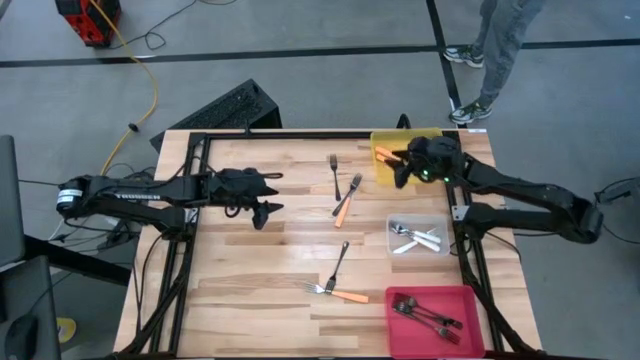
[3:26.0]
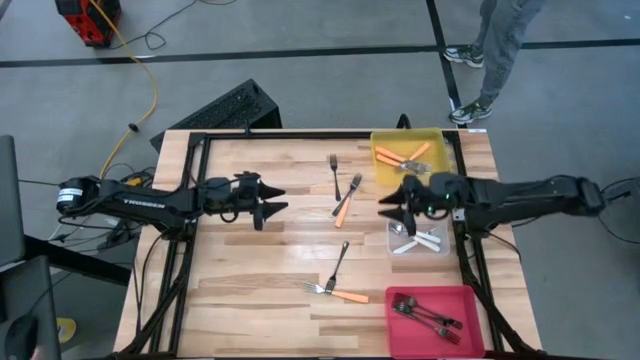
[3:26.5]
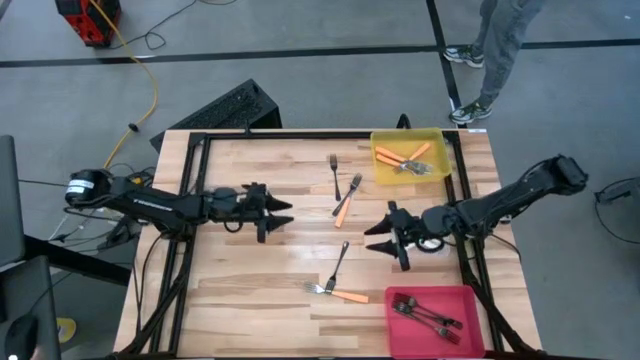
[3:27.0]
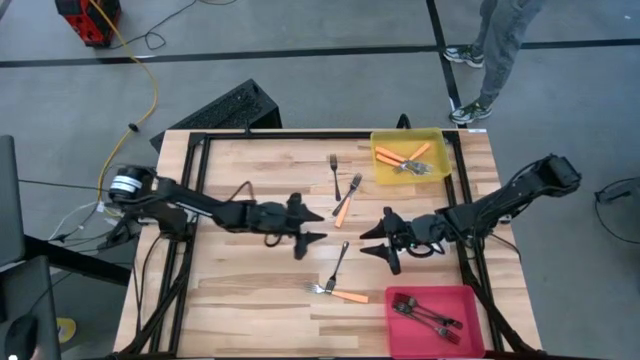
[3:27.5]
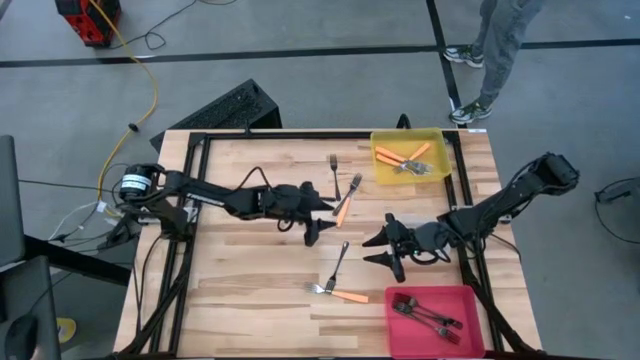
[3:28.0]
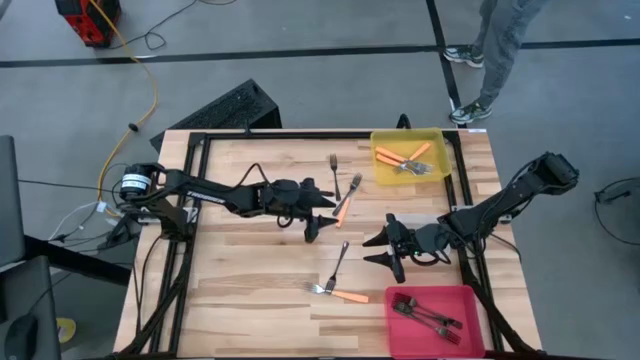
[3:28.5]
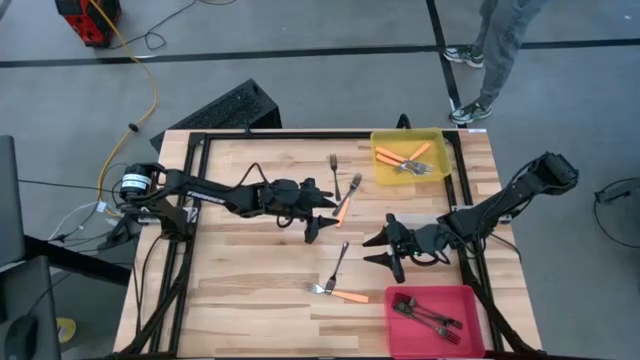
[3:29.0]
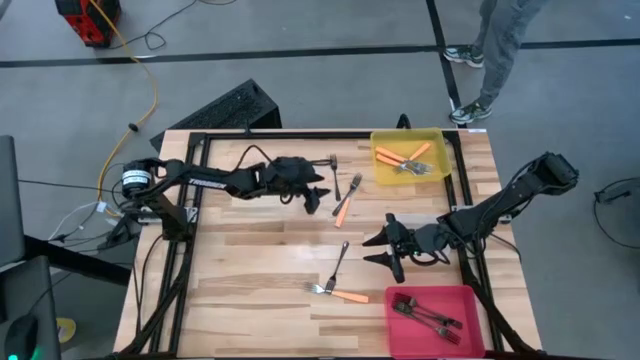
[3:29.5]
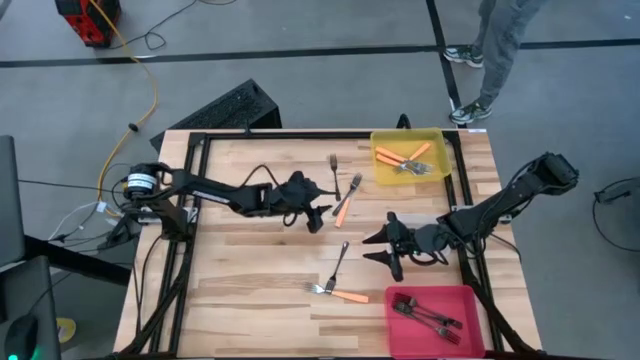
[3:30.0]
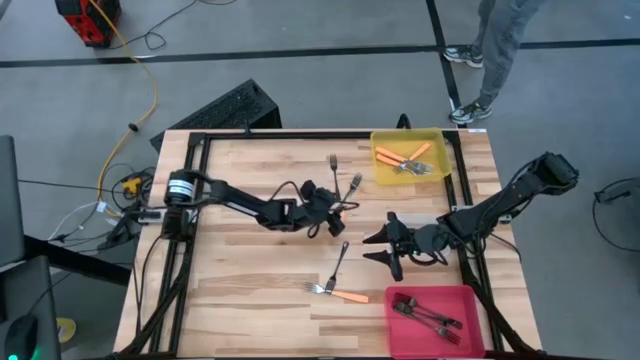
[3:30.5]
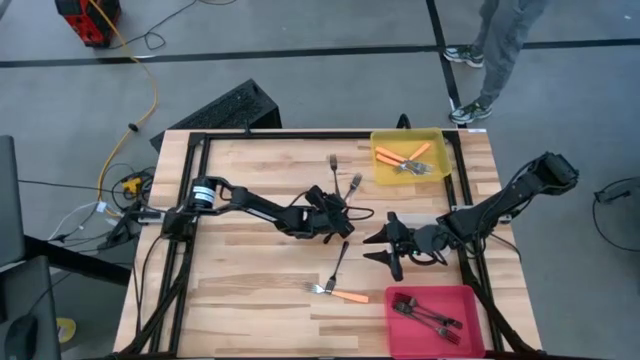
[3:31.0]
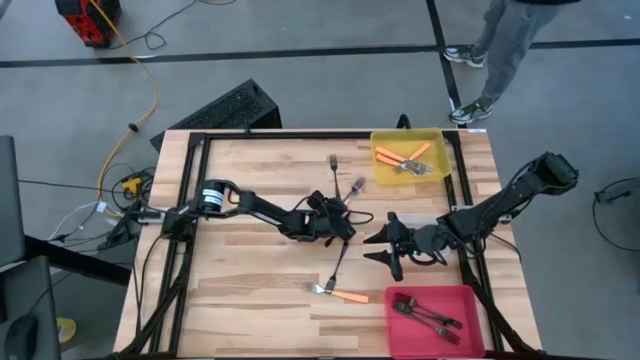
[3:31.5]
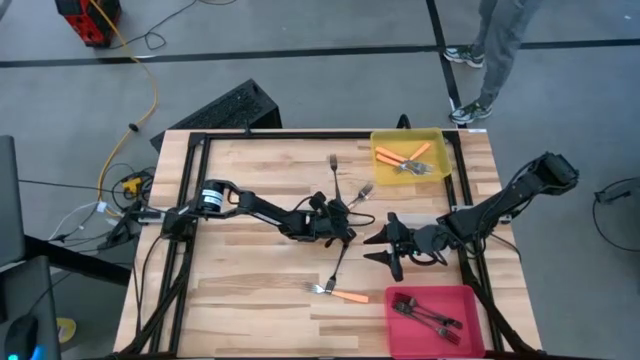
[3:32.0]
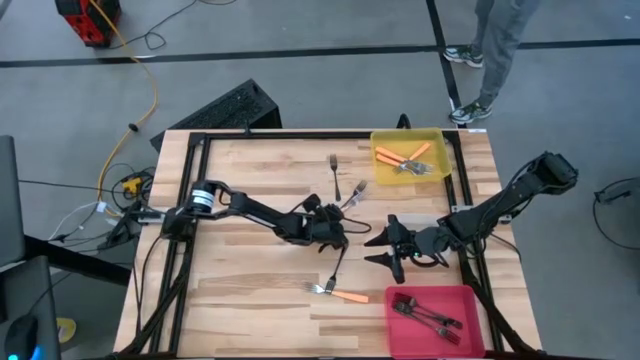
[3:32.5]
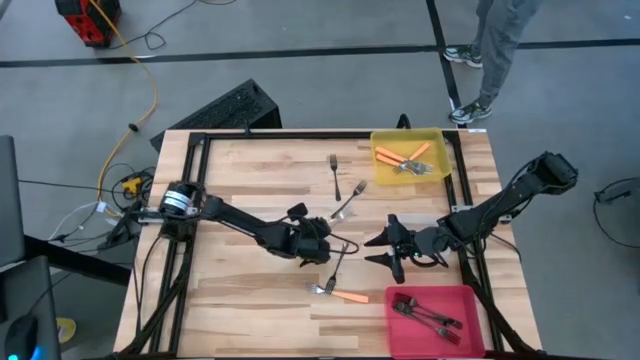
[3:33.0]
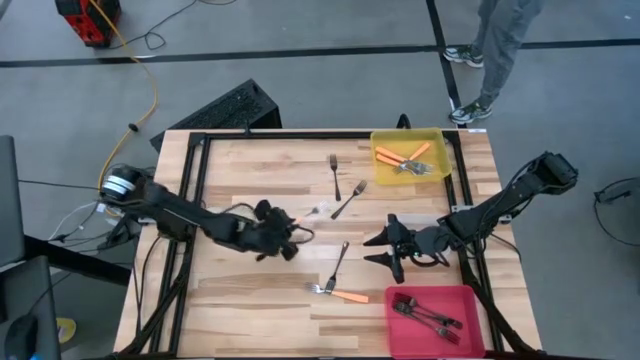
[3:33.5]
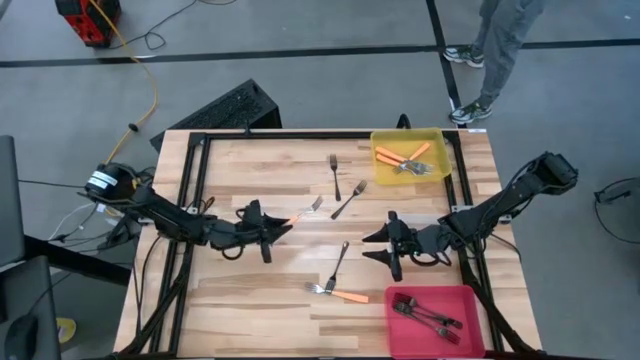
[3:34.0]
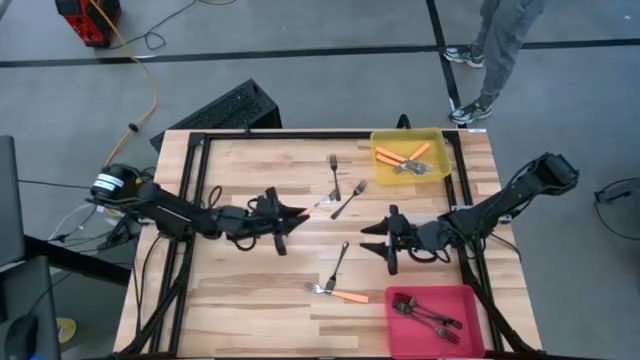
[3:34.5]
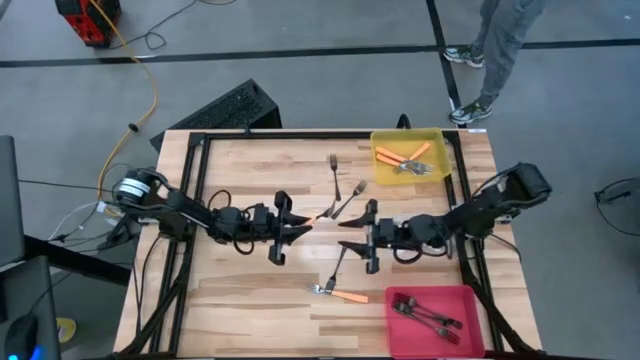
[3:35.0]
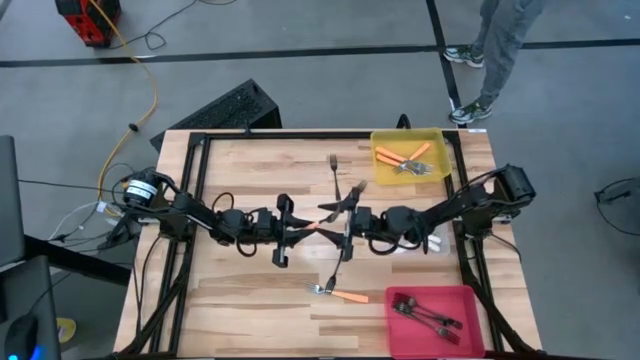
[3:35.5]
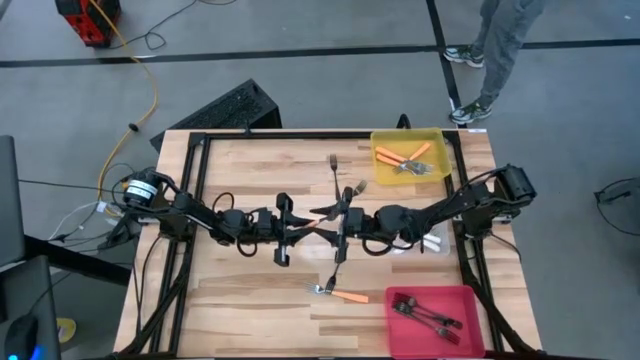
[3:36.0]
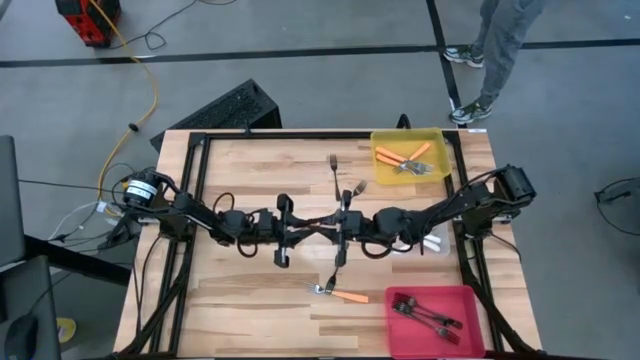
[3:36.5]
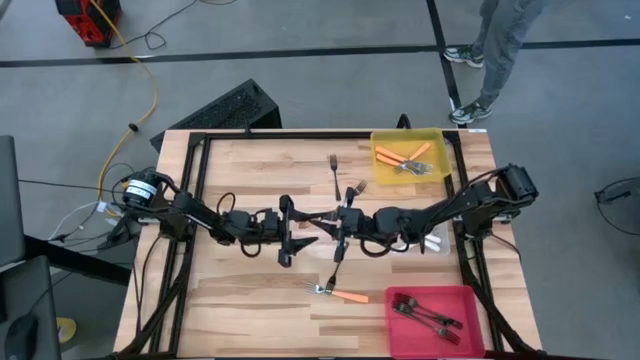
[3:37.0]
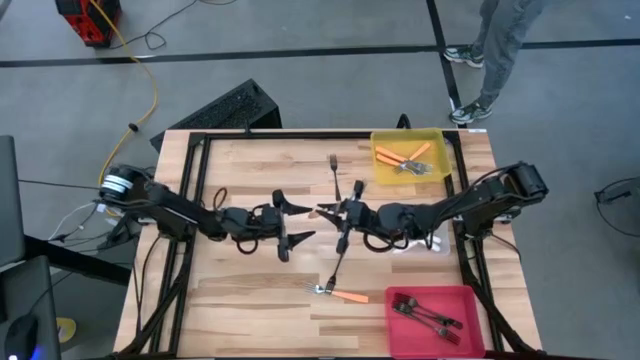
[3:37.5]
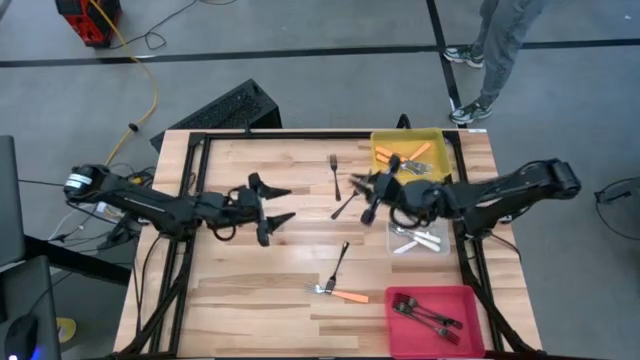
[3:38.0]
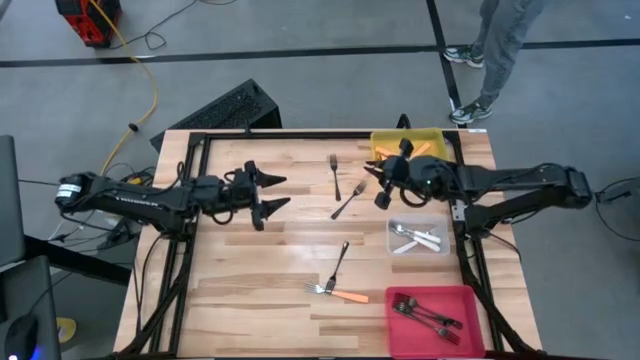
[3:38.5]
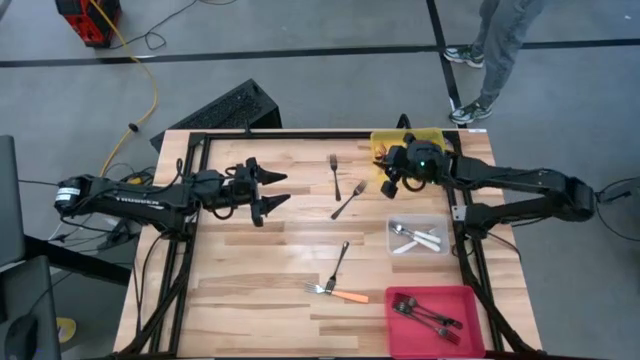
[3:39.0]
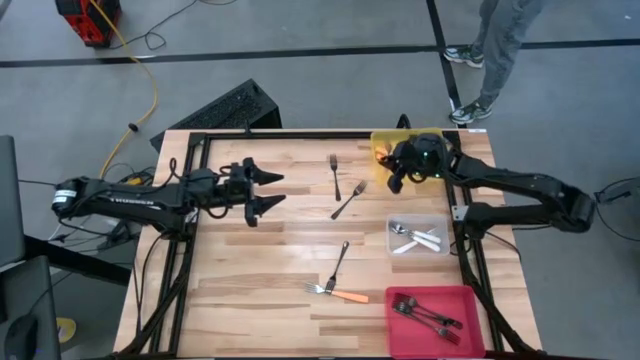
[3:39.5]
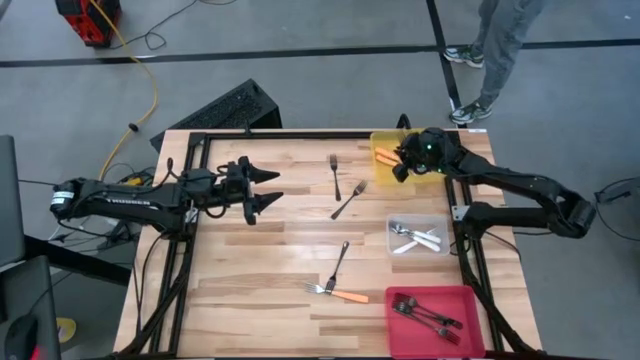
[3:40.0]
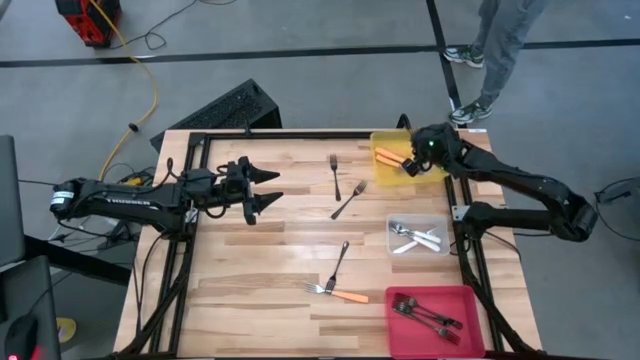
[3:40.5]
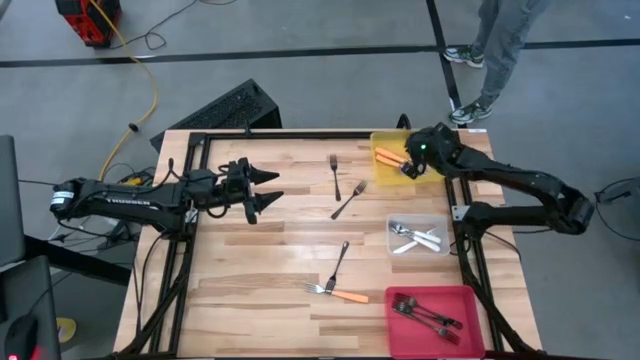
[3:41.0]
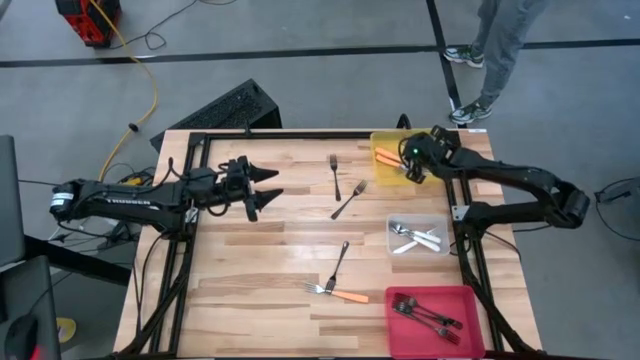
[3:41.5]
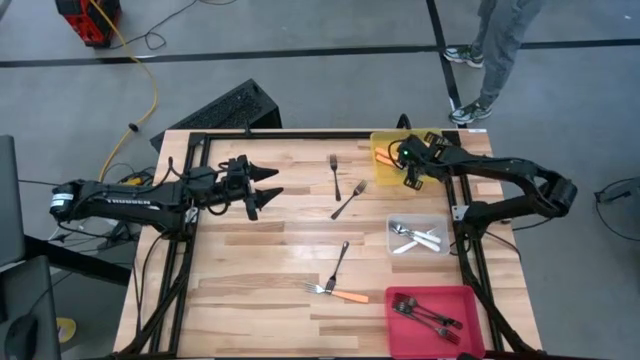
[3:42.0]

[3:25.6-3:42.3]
Task: Sort silverware by color (type)
Put the orange fork into the yellow bin

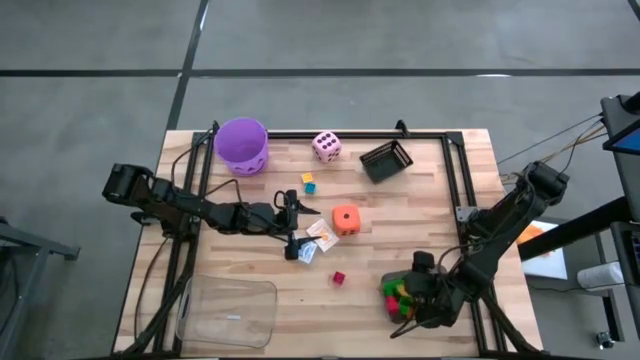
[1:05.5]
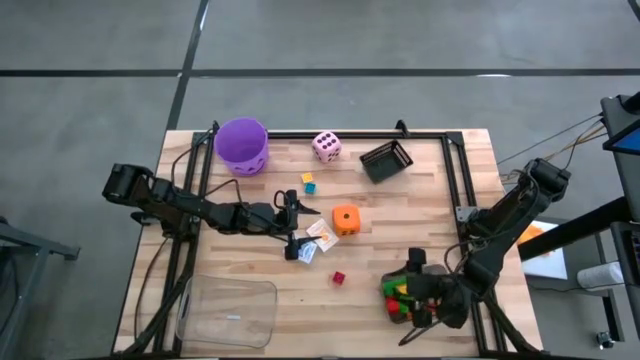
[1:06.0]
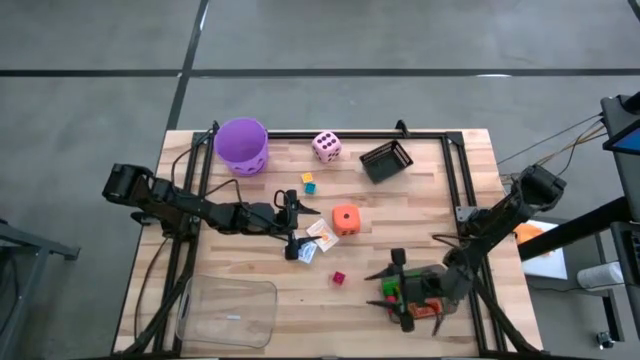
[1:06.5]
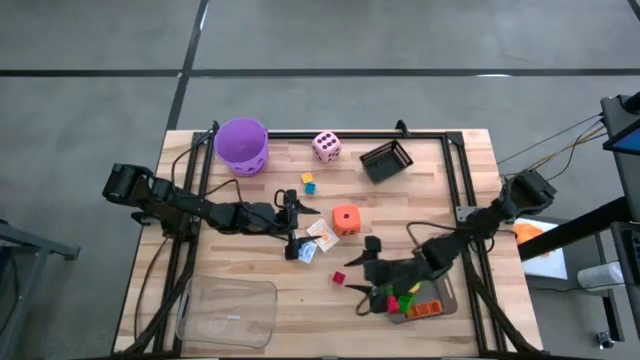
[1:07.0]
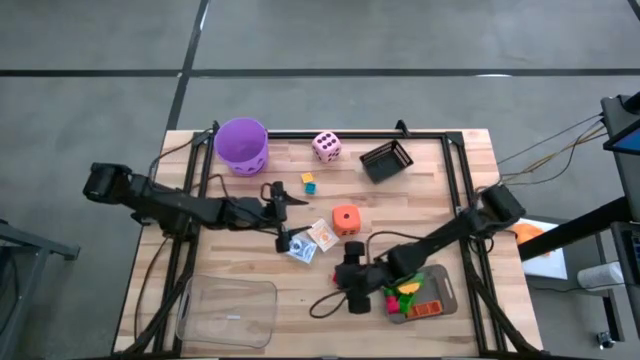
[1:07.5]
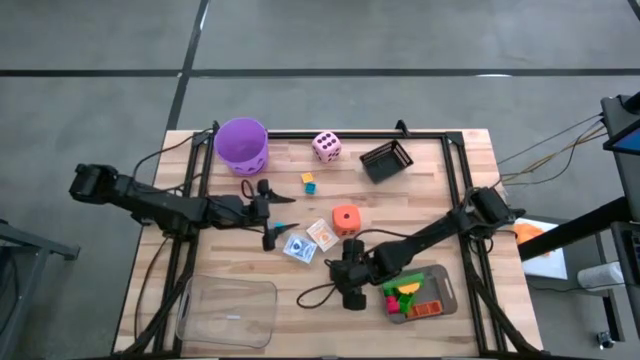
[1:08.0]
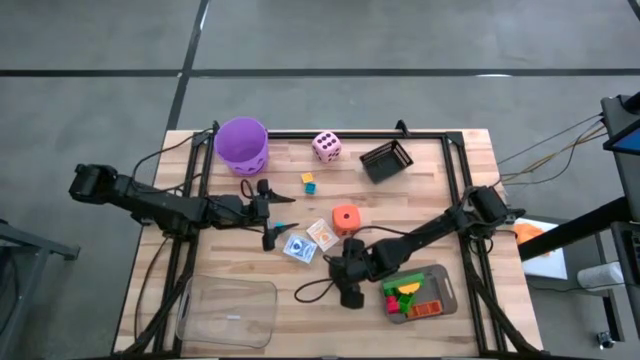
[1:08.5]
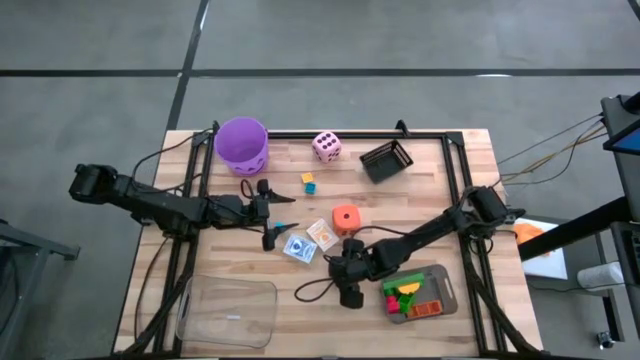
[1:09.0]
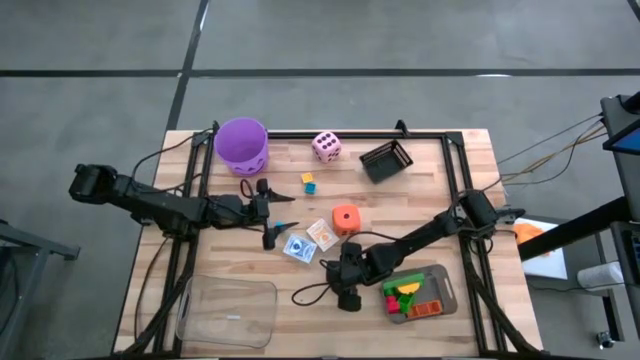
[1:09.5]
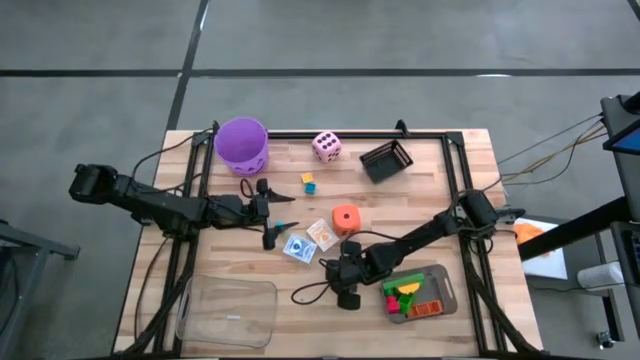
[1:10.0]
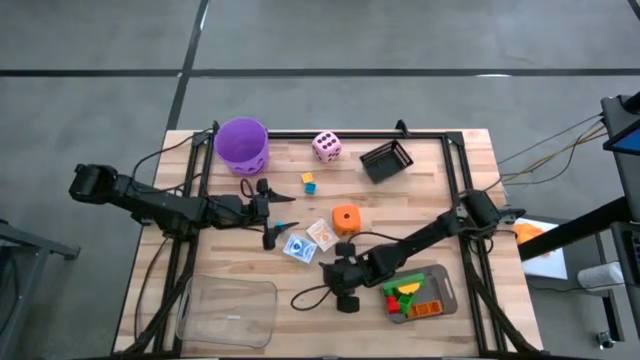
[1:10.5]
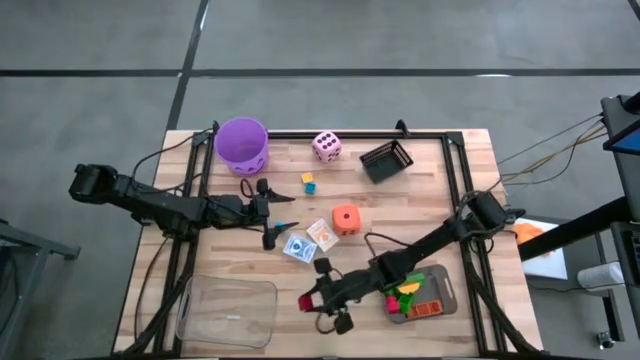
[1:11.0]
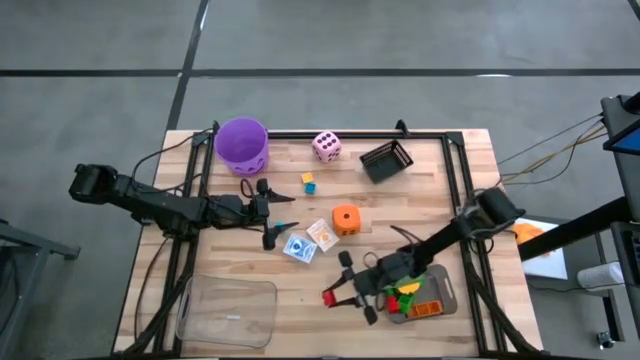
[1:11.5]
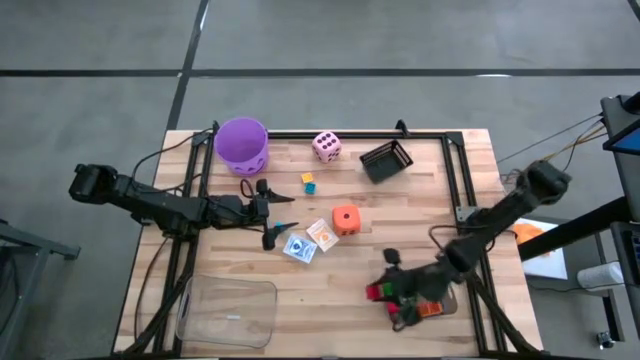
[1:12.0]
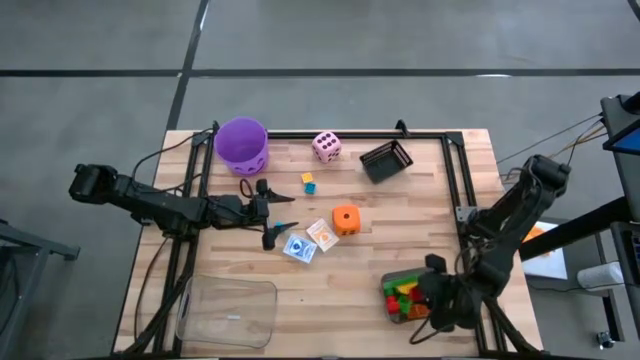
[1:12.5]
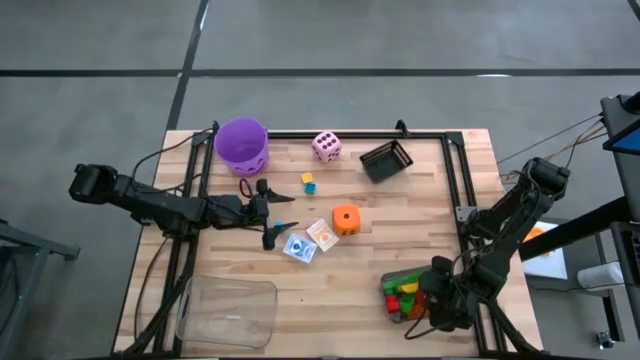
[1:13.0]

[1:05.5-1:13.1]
Task: Pick & Place Toys
Put the red game piece into the black bin
